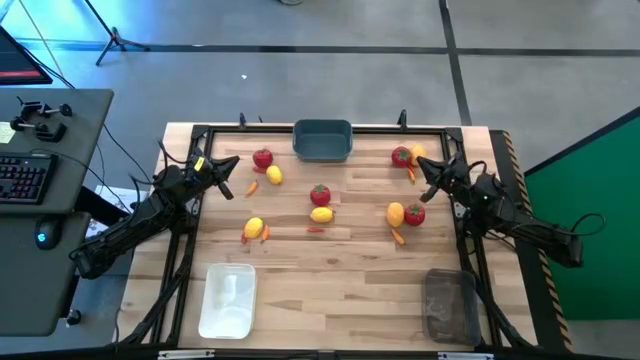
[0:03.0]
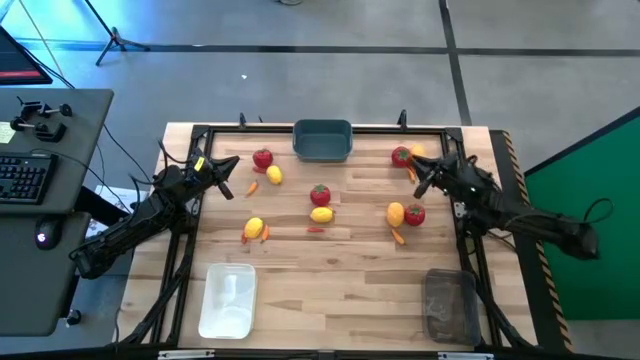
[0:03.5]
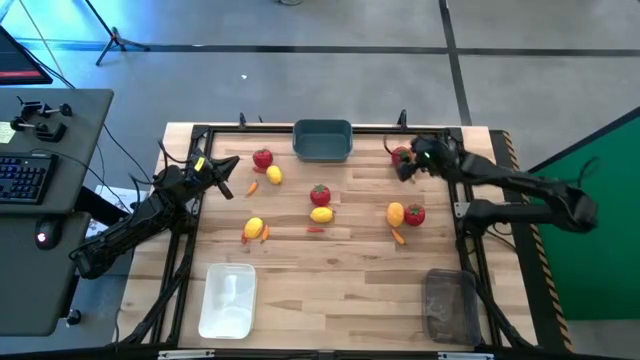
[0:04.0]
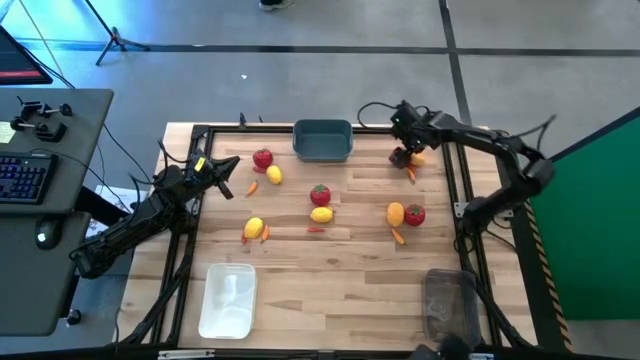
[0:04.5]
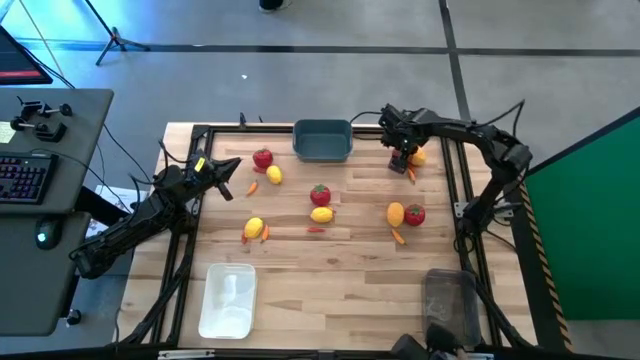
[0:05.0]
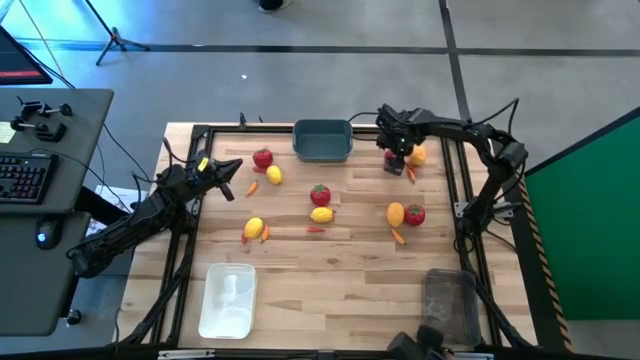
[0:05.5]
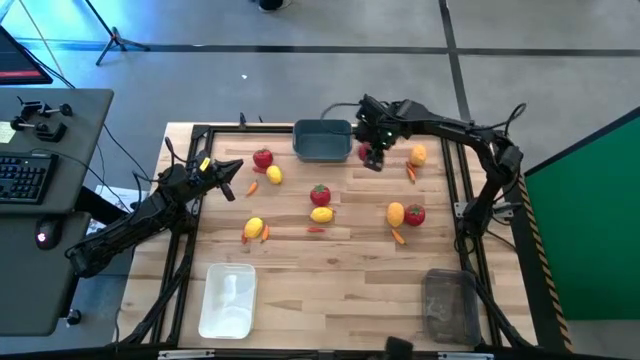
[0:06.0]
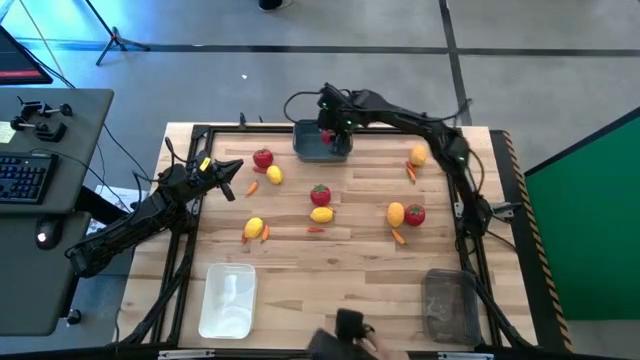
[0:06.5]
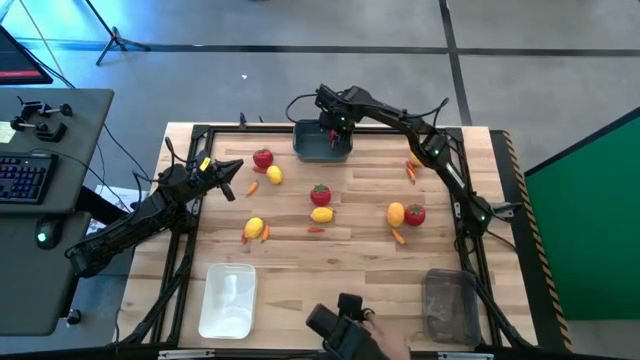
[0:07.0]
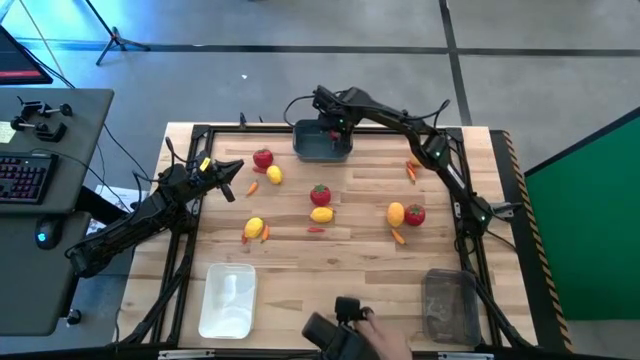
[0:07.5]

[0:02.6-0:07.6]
Task: Sort produce into baskets
Put the top right red tomato into the blue bin

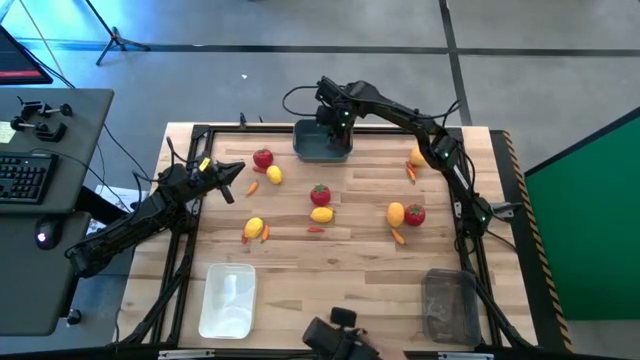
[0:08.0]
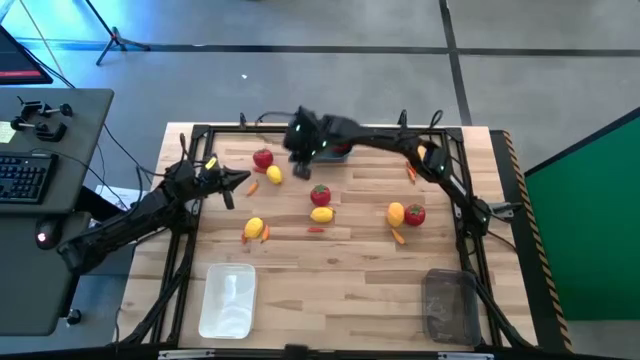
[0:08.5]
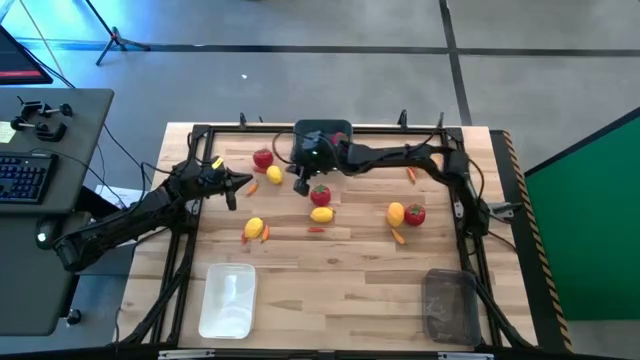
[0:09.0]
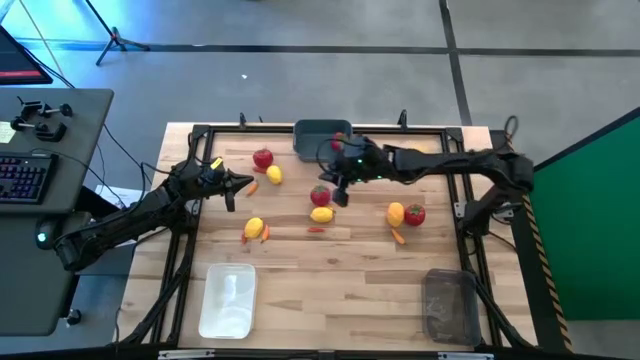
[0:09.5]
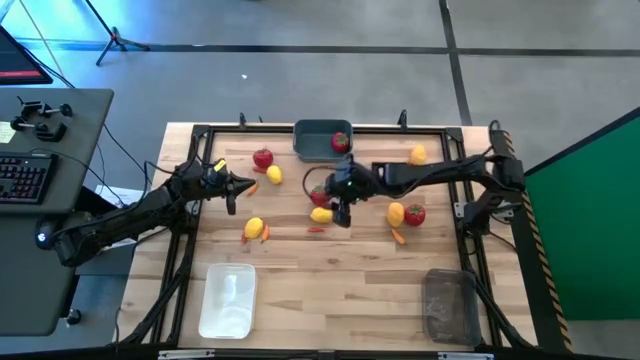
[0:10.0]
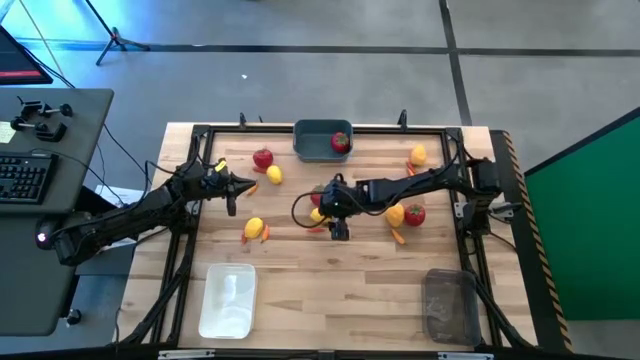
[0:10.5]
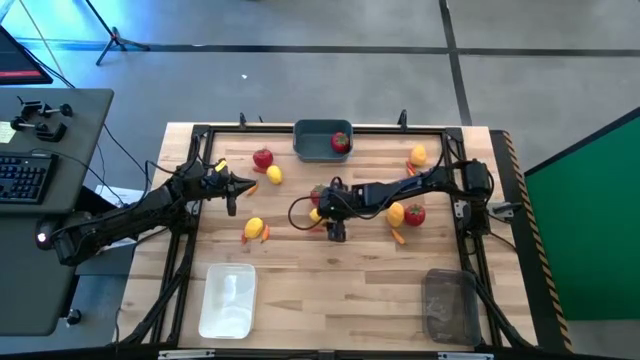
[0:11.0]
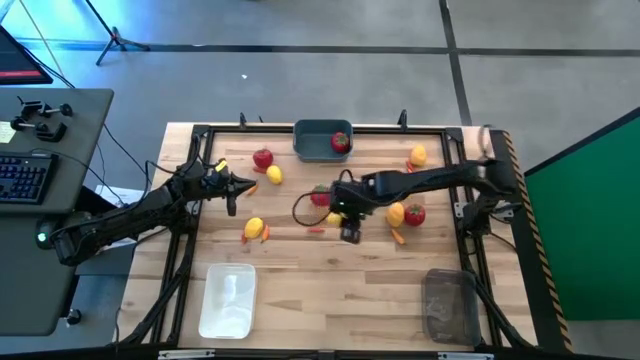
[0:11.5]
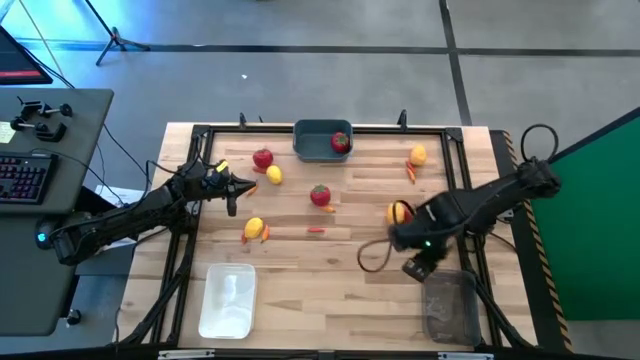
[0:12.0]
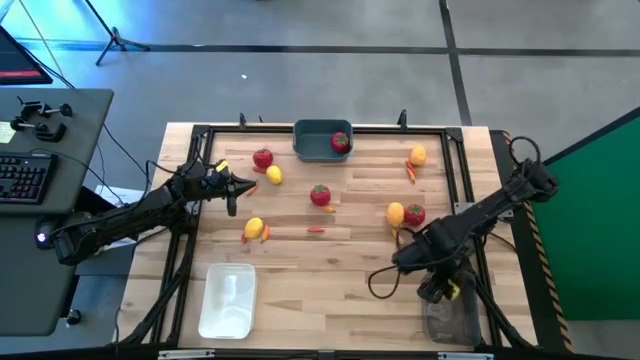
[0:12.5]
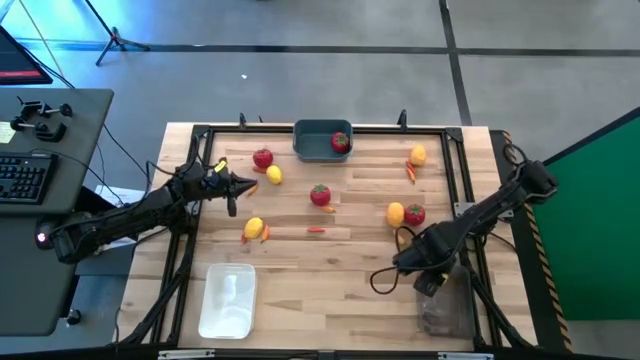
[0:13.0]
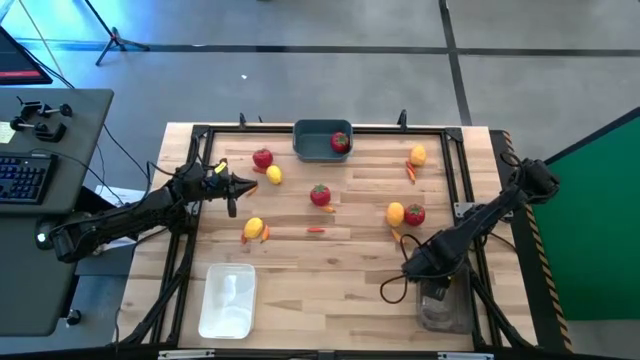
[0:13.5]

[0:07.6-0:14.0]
Put the bottom center yellow lemon into the black transparent bin

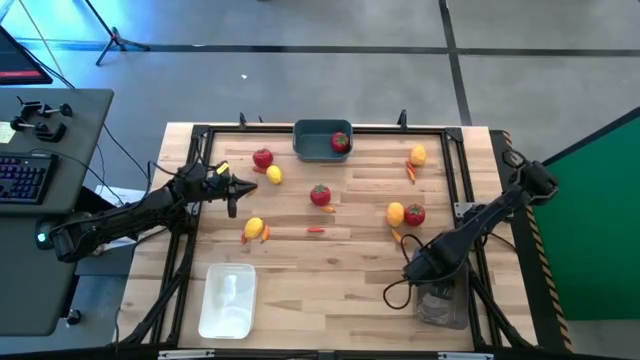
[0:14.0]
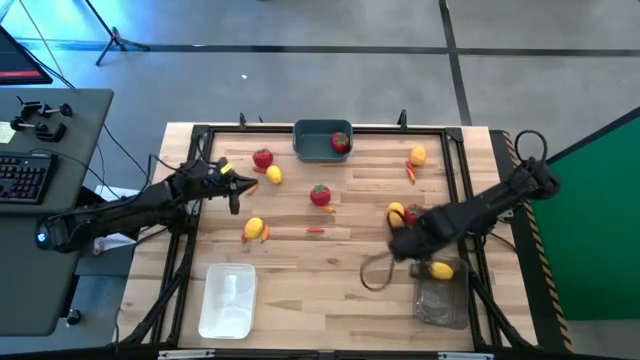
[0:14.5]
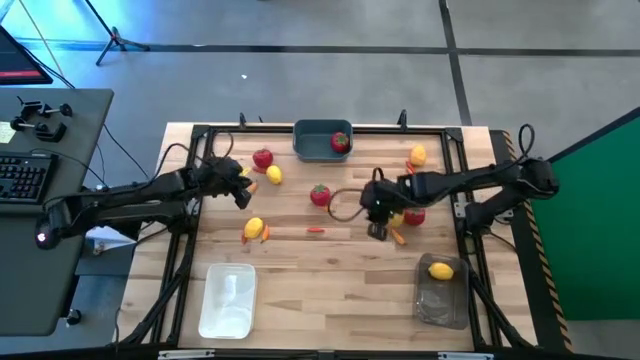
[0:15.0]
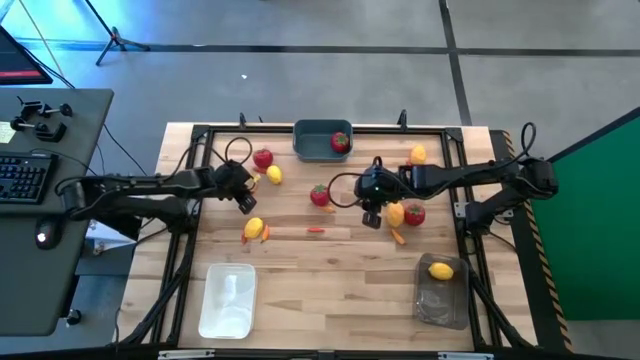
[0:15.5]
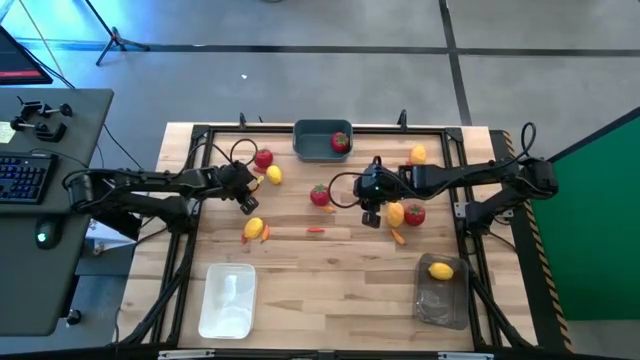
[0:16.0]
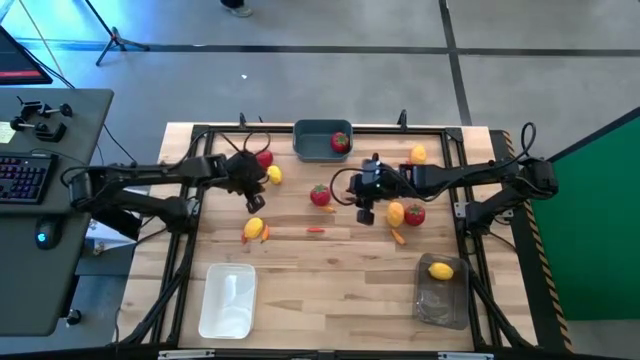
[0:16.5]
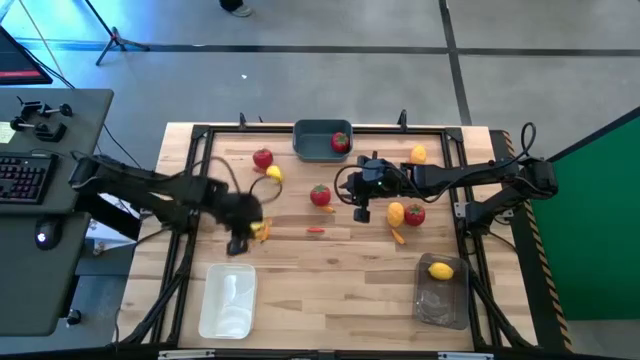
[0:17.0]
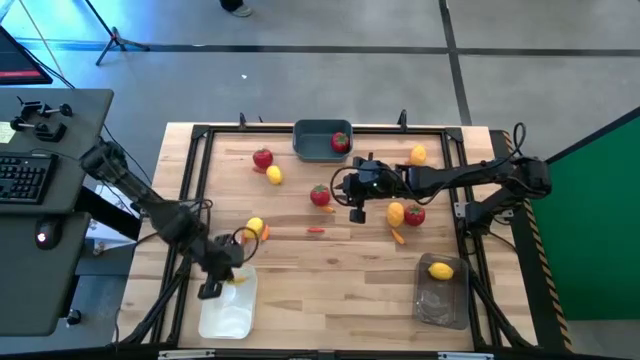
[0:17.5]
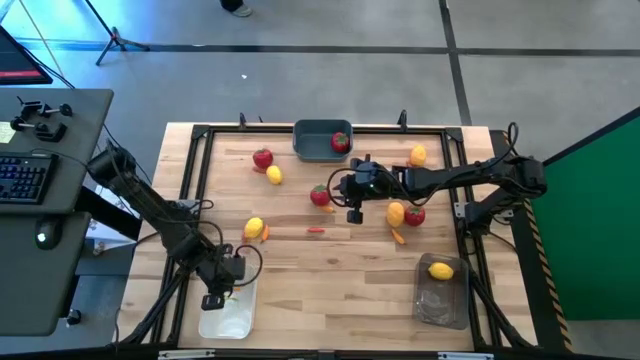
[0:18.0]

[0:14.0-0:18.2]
Put the top left orange chili pepper into the white bin

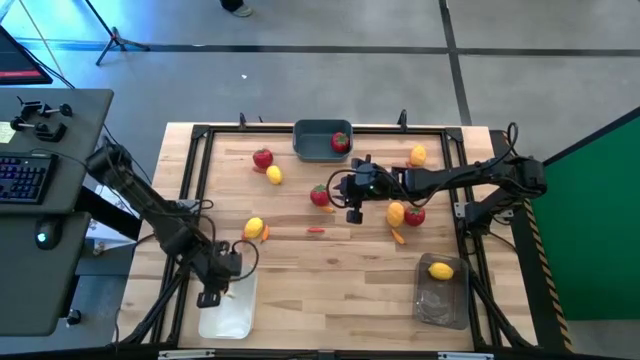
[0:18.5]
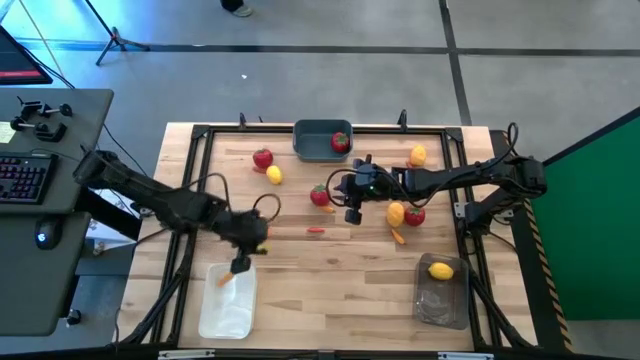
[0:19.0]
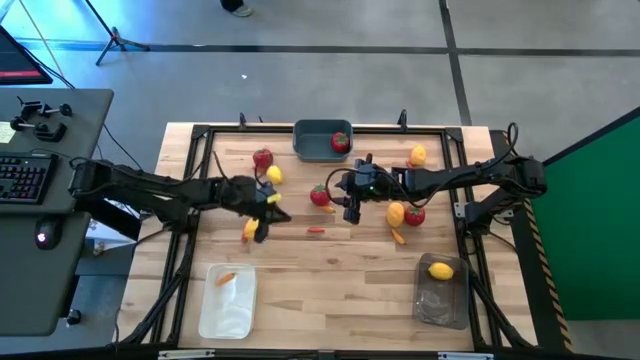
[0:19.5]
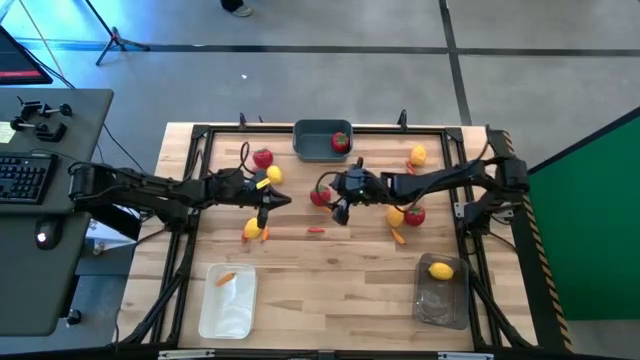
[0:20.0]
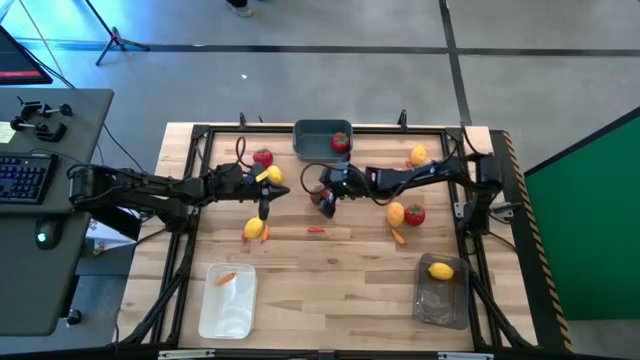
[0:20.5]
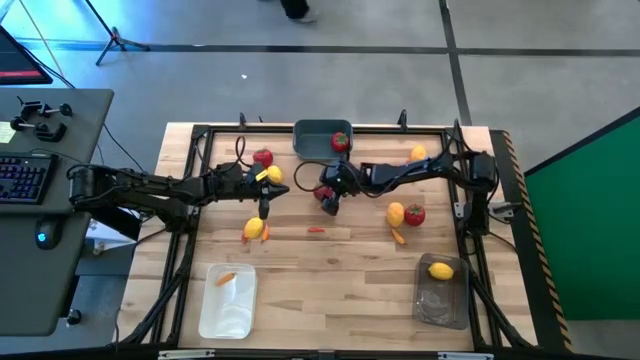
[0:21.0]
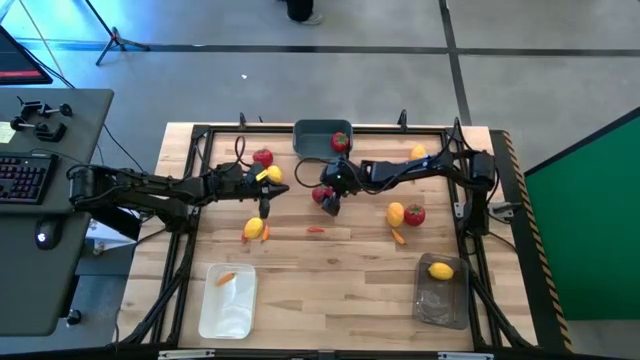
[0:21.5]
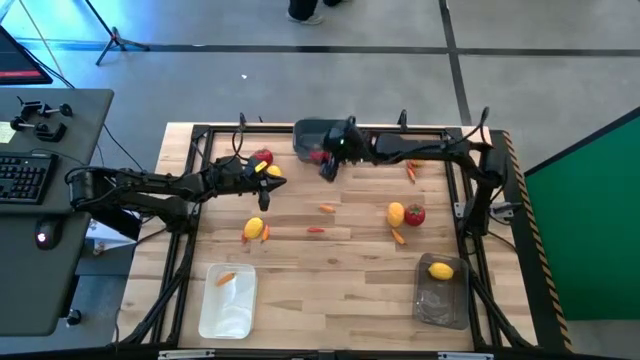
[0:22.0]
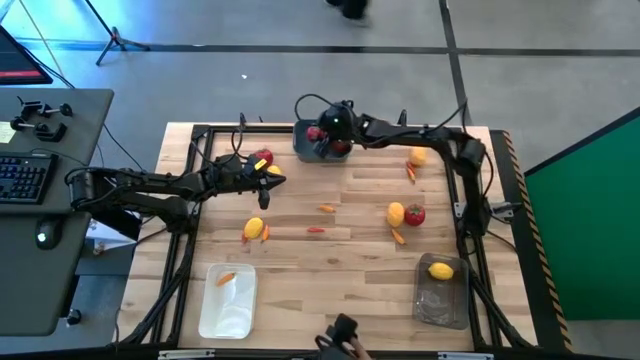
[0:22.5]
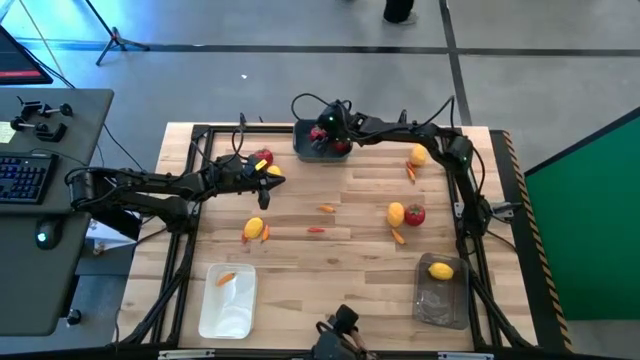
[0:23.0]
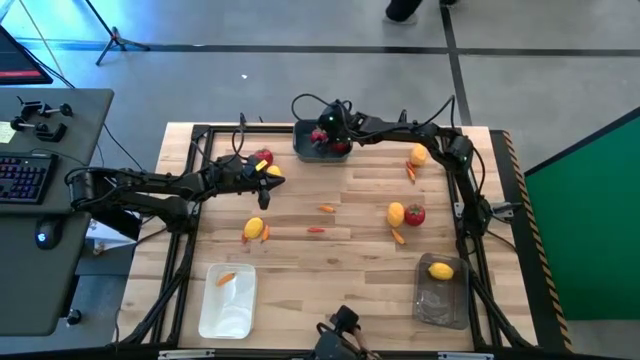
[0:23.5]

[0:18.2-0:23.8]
Put the center red tomato into the blue bin
